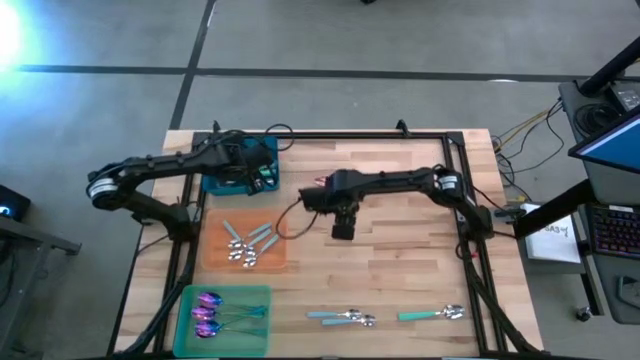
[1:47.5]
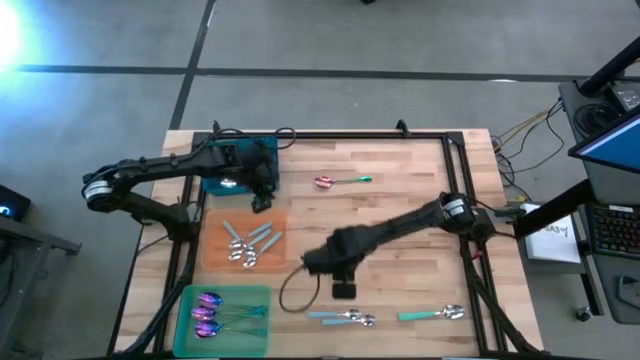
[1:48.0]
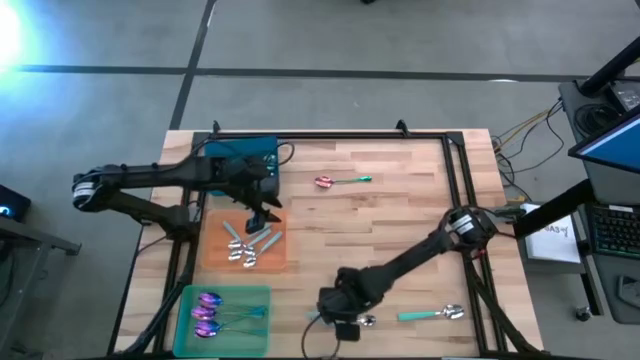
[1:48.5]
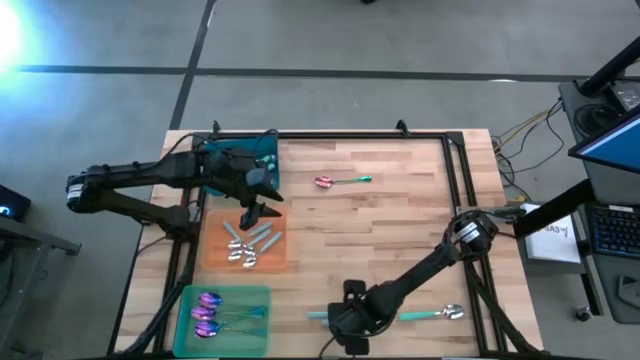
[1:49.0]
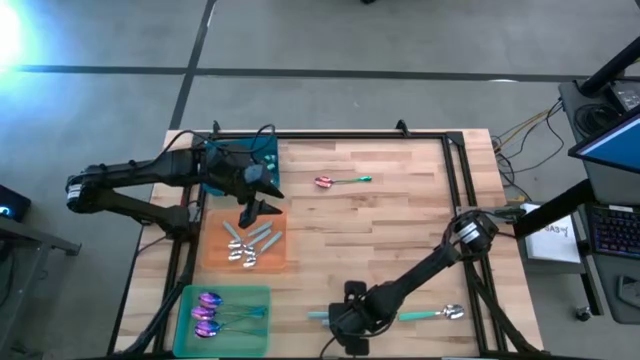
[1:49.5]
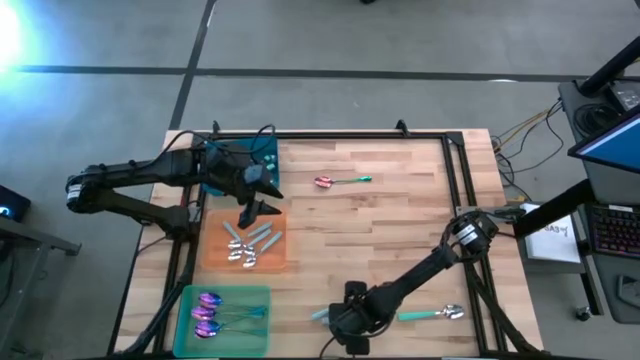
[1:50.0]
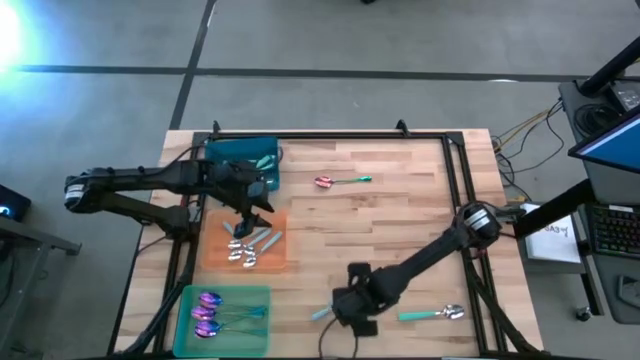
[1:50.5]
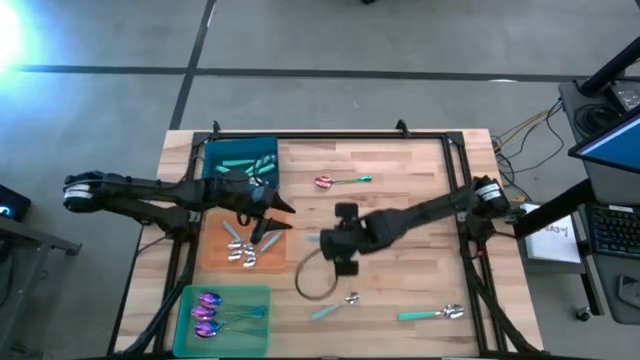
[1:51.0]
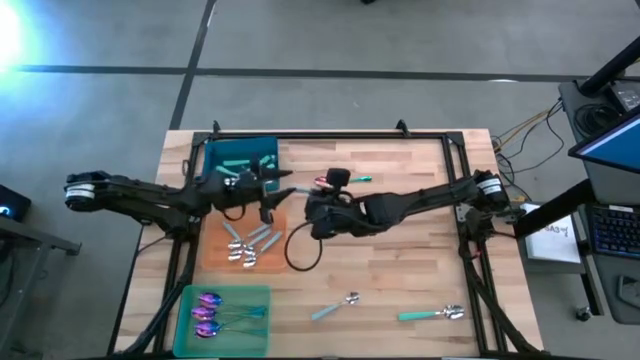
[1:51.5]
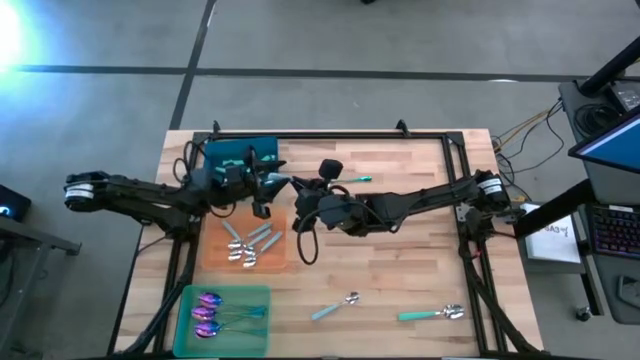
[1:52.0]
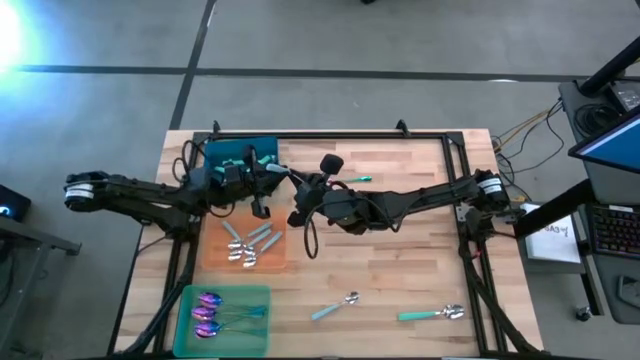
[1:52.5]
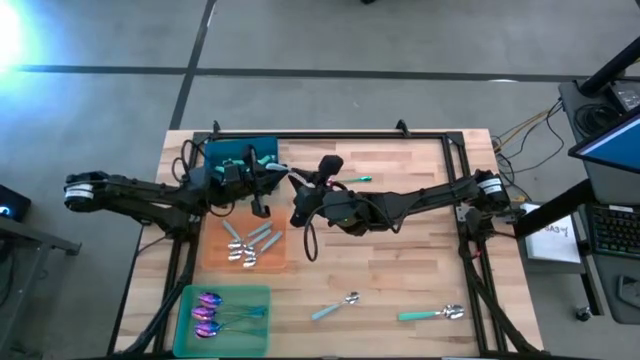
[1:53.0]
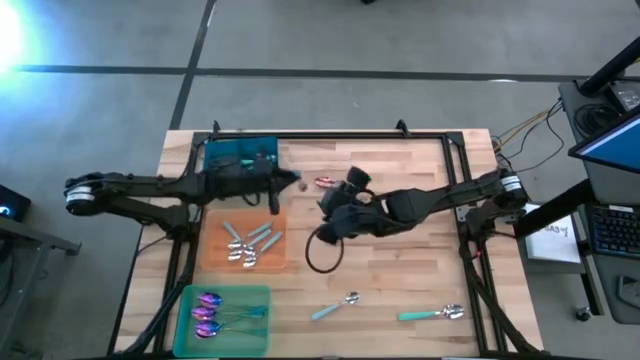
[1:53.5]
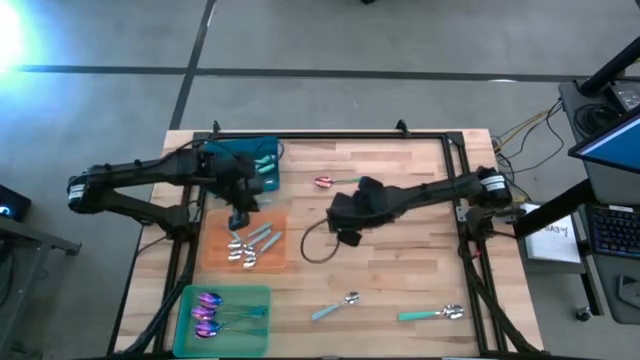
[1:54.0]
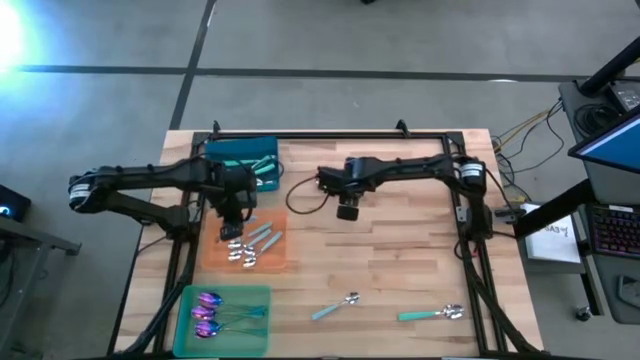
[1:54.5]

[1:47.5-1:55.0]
Task: Sort silverware by color (type)
Put the blue spoon into the orange bin

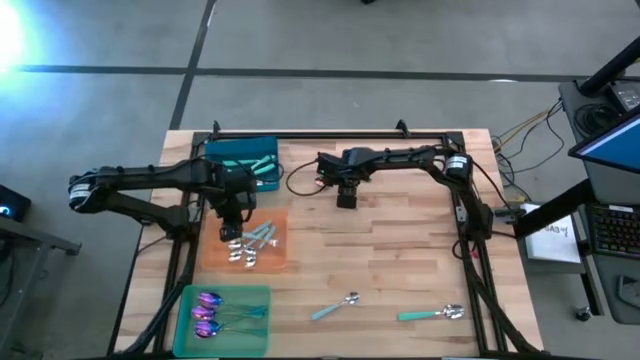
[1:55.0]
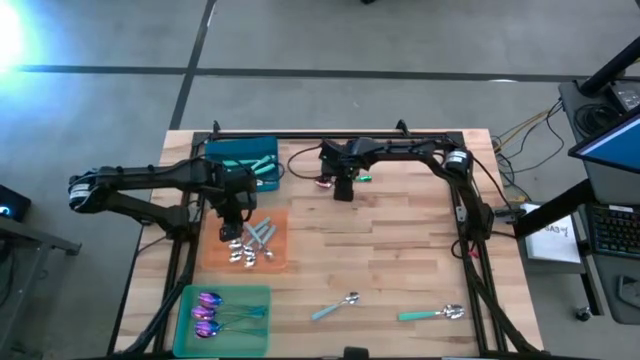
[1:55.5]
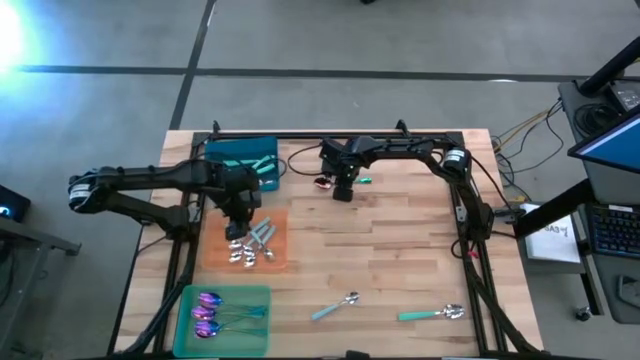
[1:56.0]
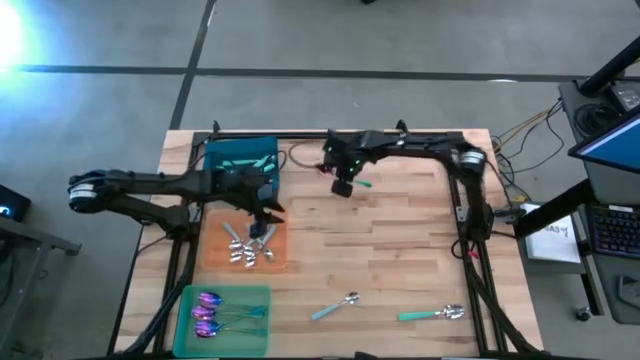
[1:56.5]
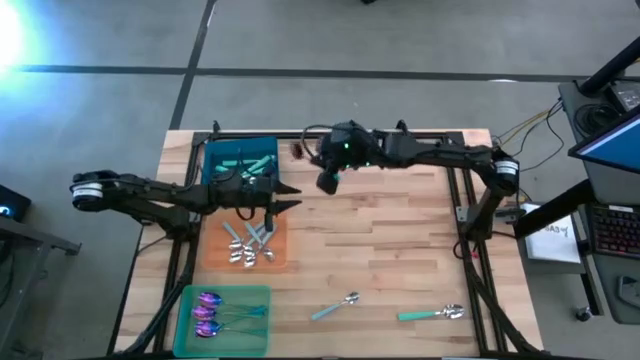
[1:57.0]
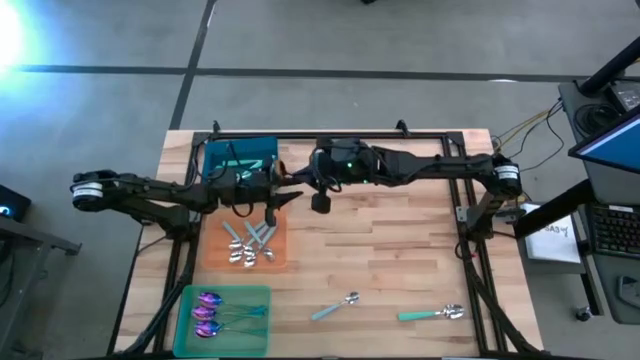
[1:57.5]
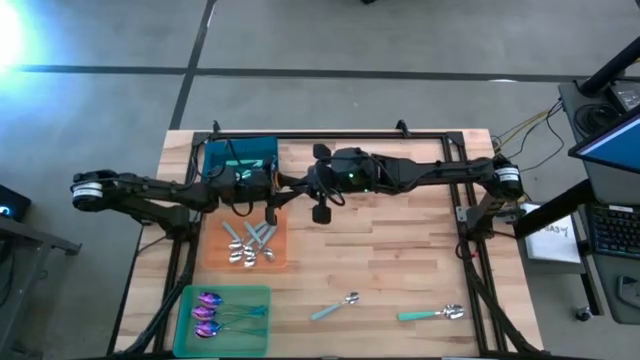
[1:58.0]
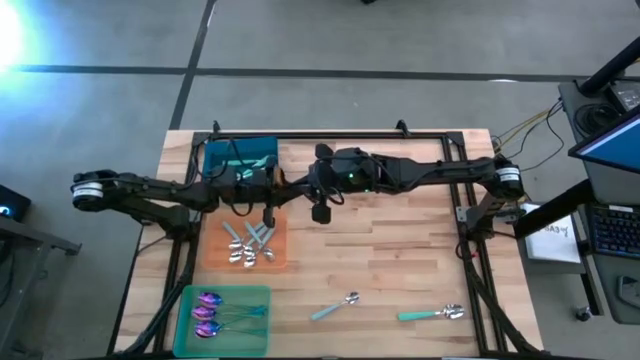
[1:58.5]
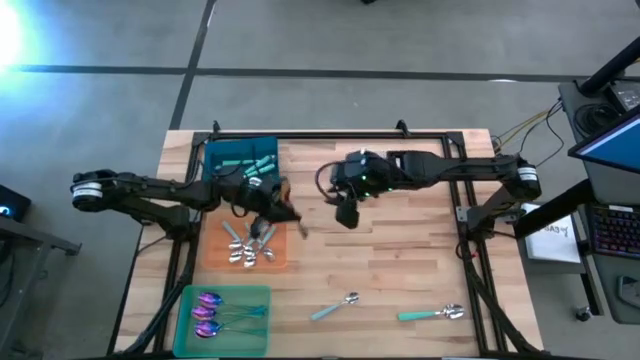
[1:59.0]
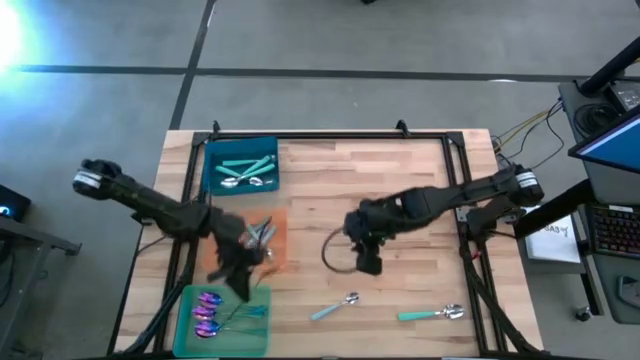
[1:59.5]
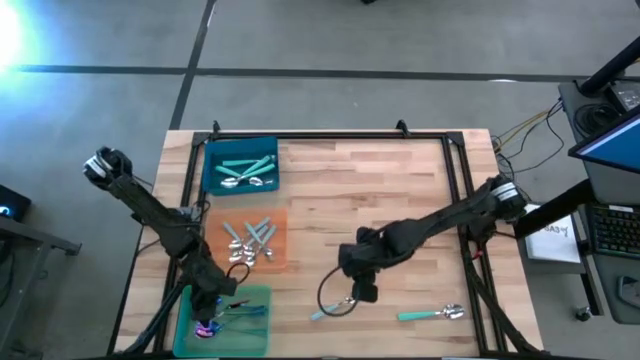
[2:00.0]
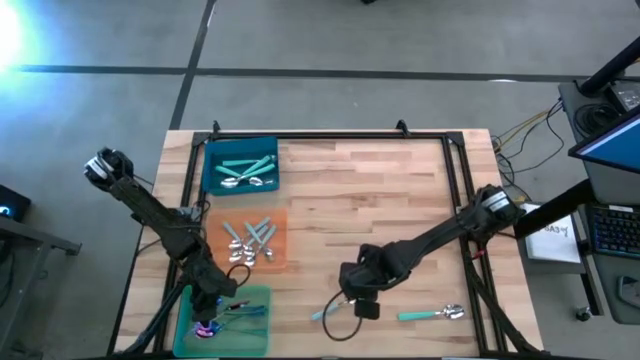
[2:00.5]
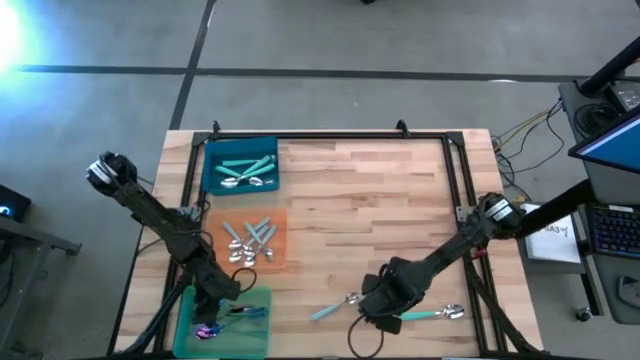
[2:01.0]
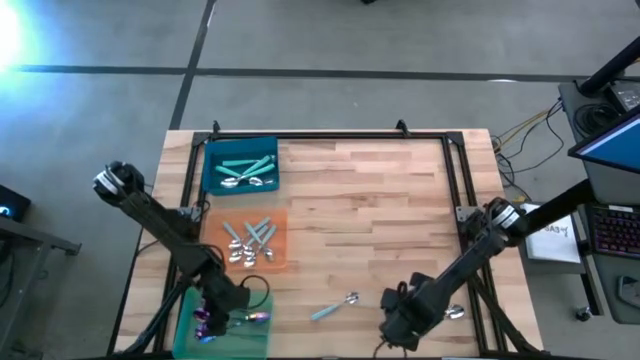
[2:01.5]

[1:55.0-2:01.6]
Put the violet spoon into the green bin

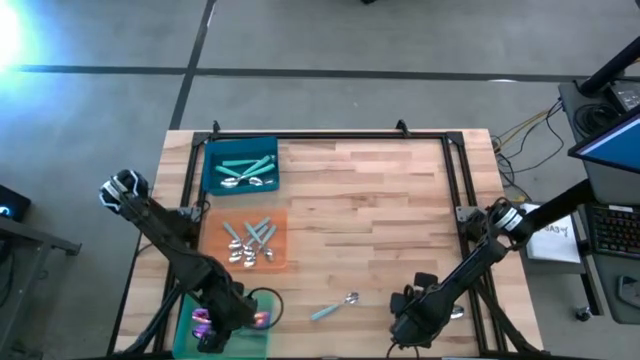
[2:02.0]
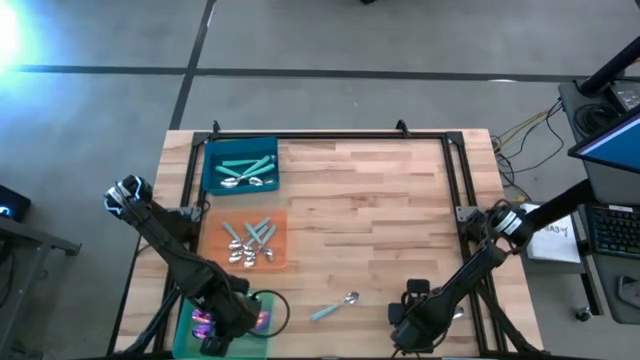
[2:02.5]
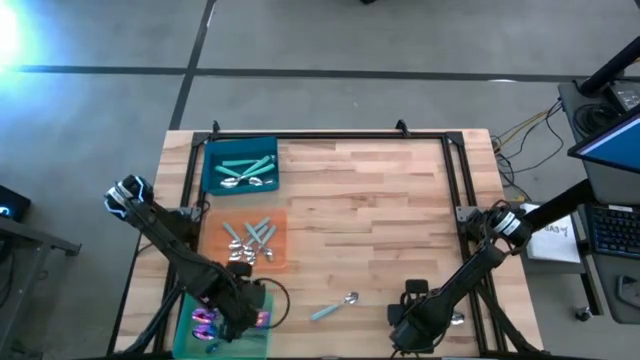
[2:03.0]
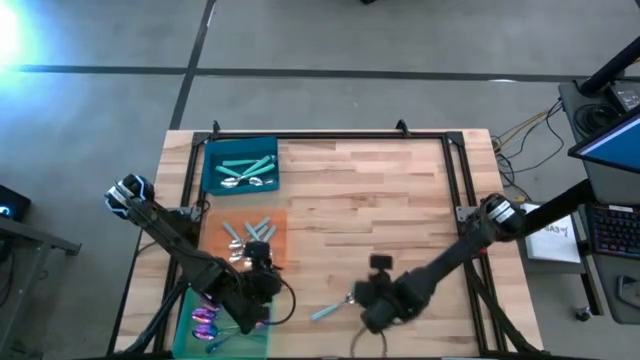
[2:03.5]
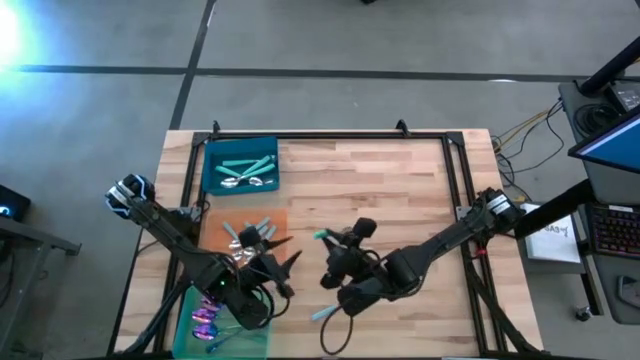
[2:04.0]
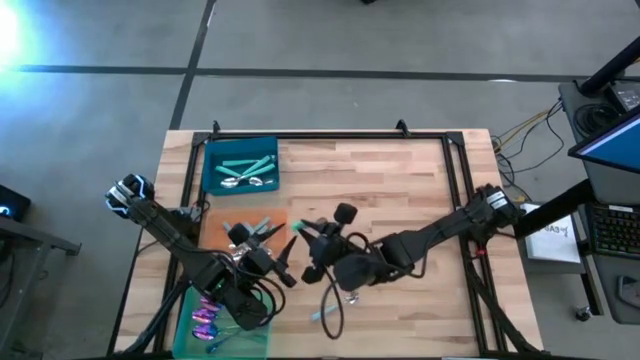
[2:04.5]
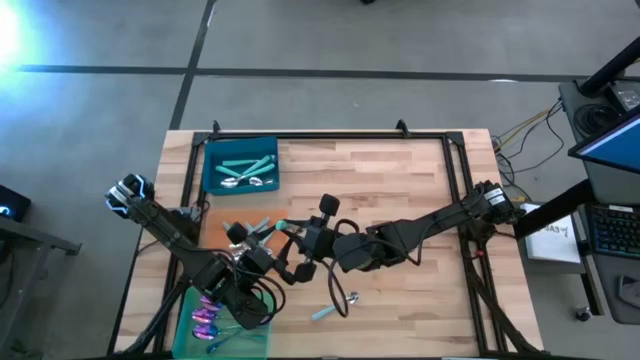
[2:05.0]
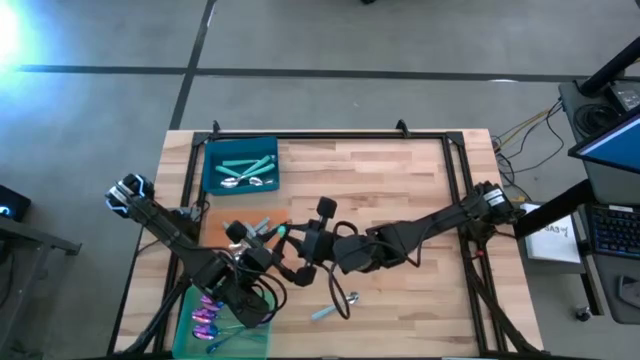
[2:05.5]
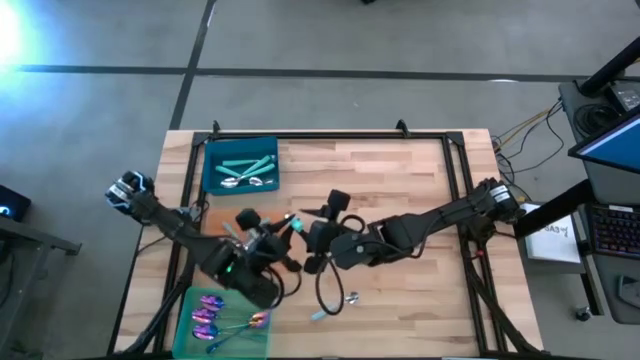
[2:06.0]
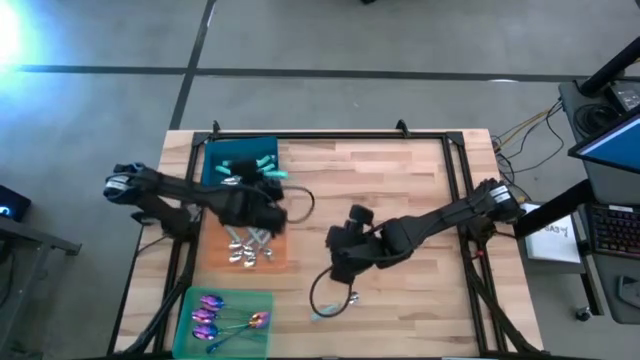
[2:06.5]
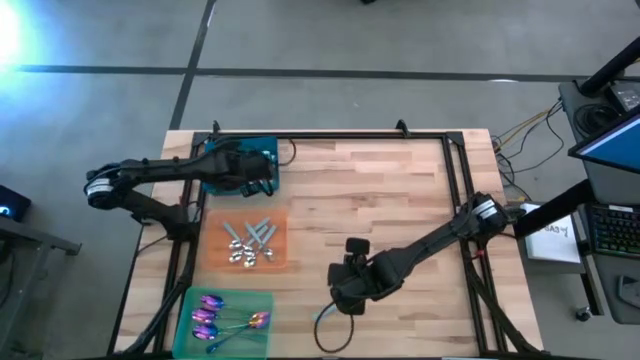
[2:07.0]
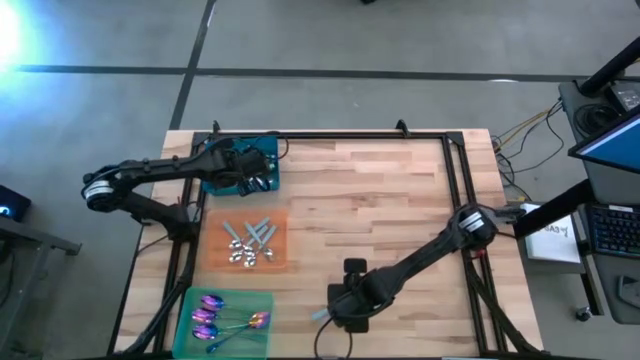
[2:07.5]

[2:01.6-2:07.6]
Put the green spoon into the blue bin

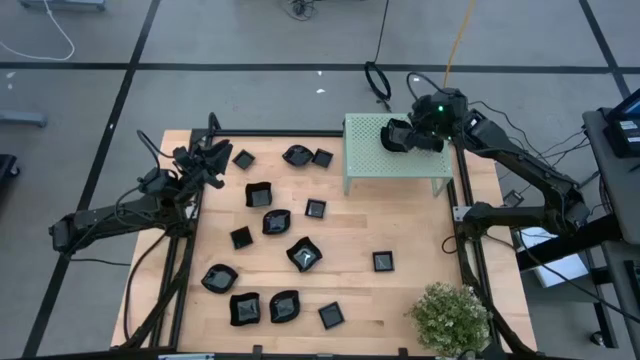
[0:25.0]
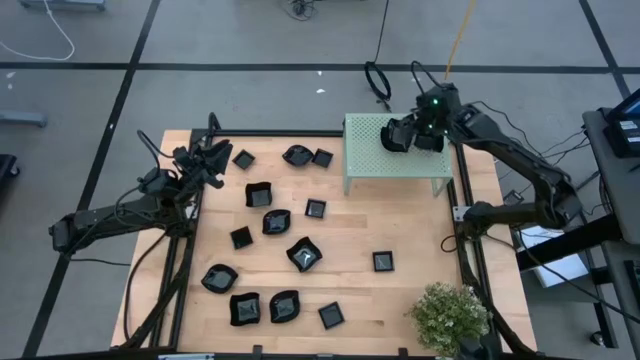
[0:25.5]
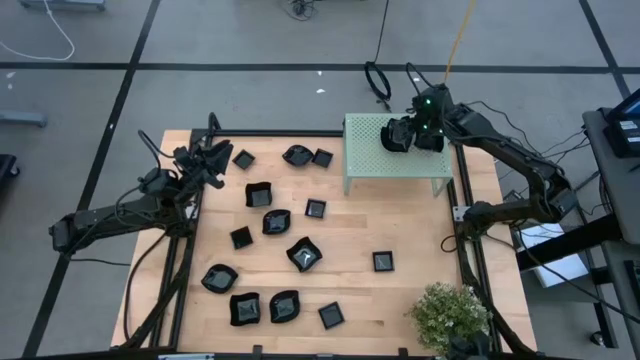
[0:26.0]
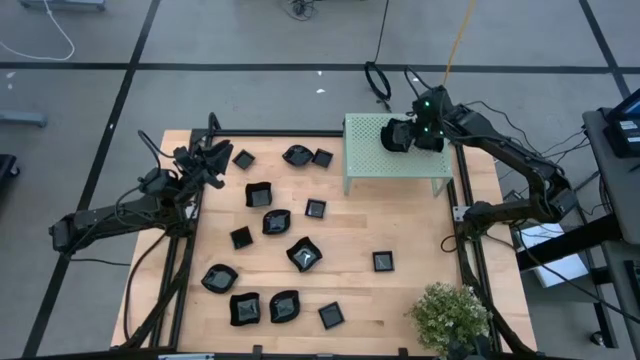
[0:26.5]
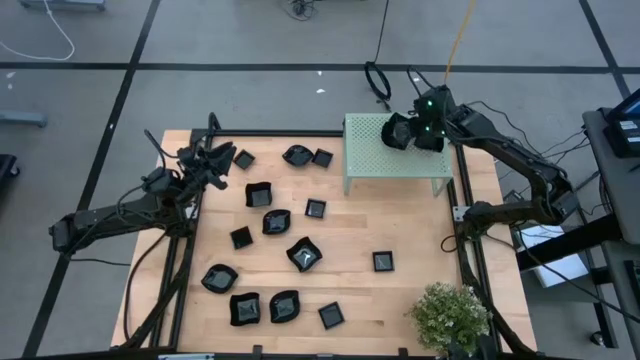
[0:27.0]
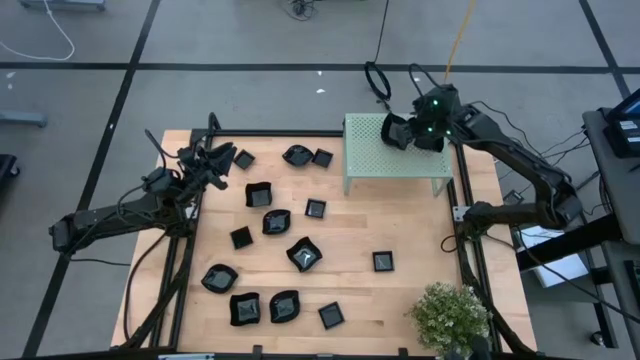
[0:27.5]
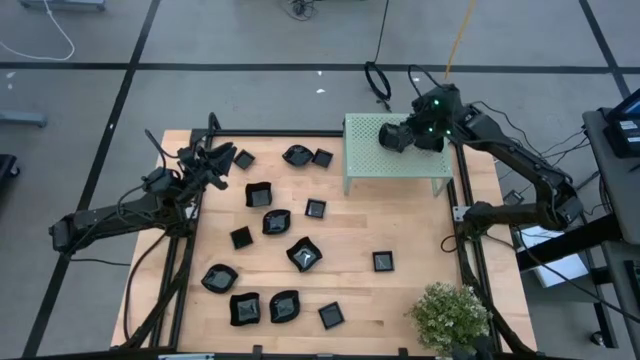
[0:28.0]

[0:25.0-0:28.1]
Task: Pick & Place Mini shaped plates
Stack the leaf-shaped plate on top of the leaf-shaped plate on the shelf
